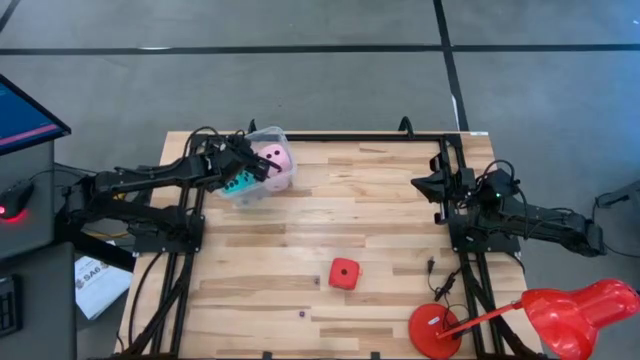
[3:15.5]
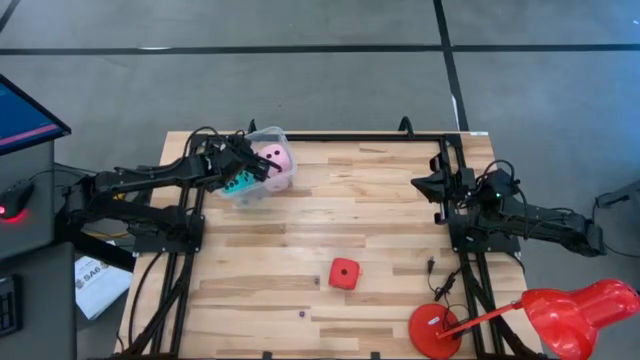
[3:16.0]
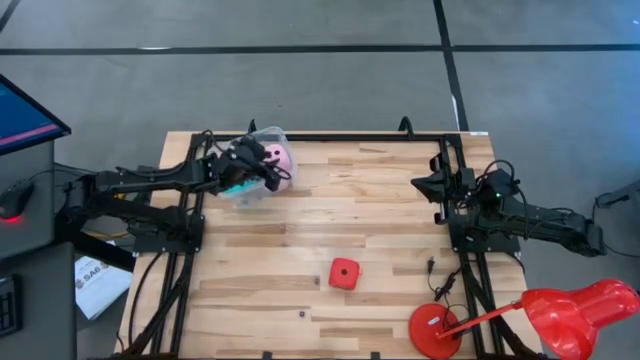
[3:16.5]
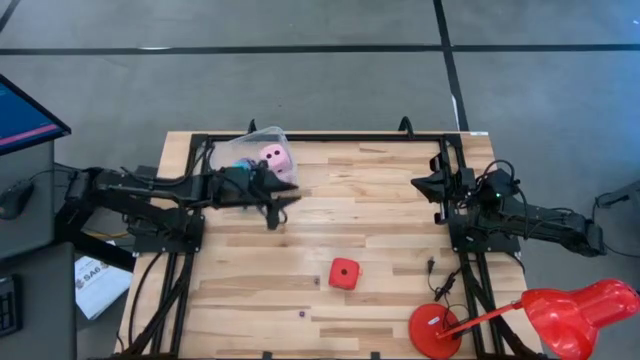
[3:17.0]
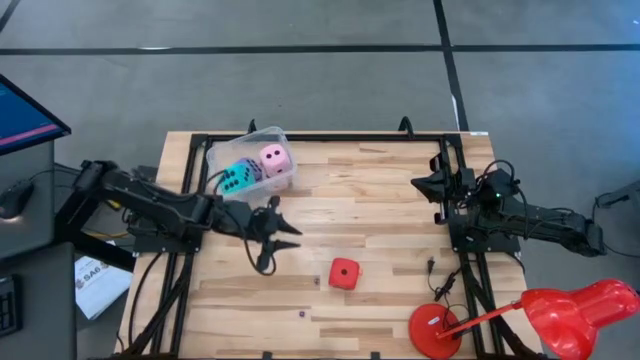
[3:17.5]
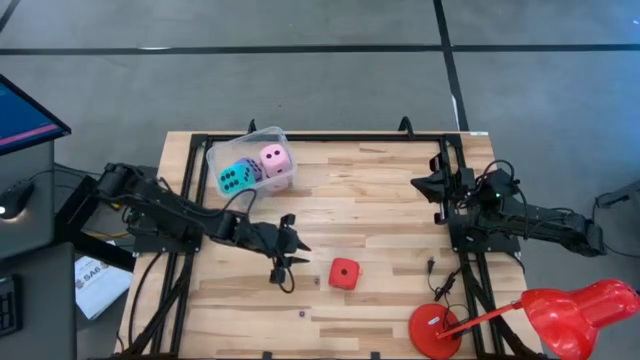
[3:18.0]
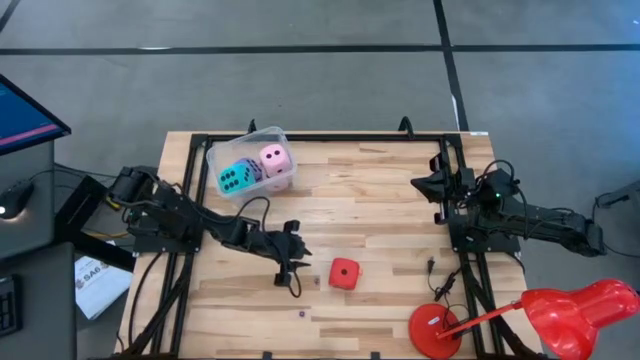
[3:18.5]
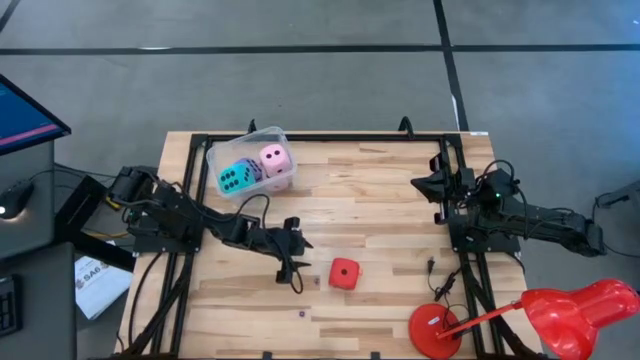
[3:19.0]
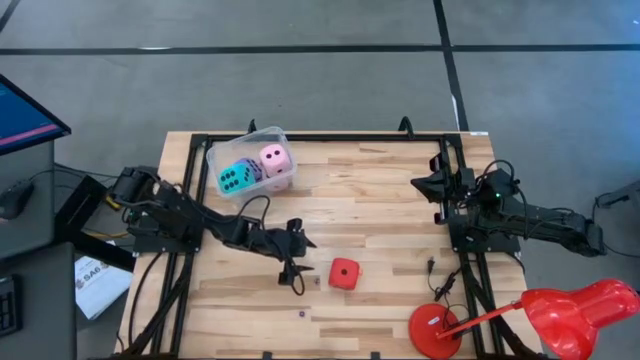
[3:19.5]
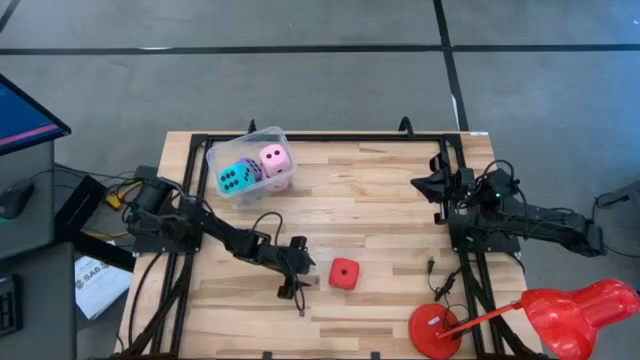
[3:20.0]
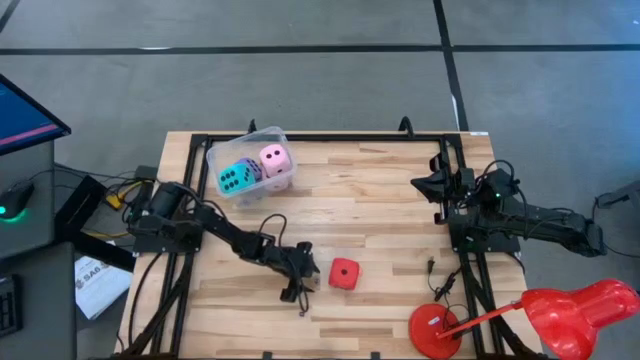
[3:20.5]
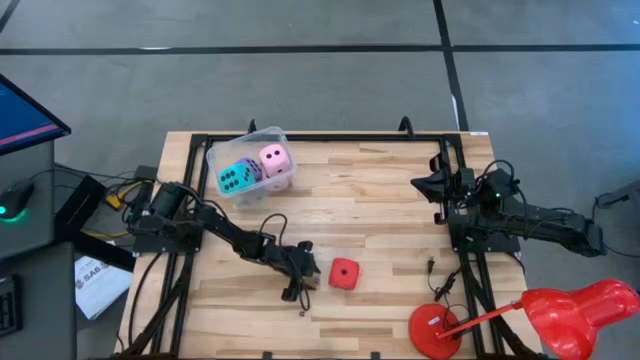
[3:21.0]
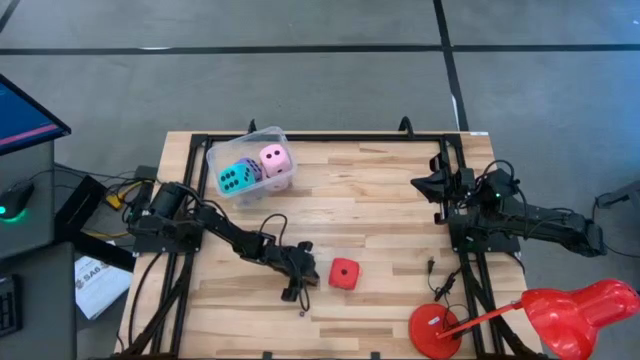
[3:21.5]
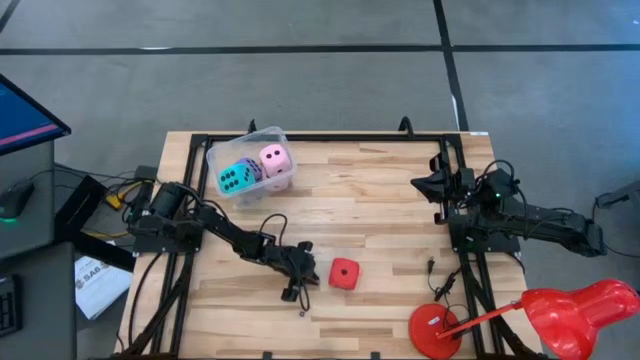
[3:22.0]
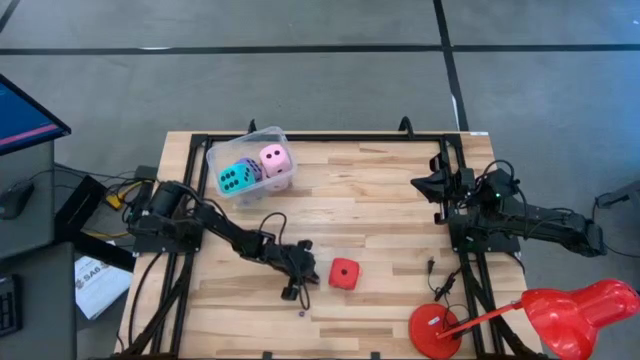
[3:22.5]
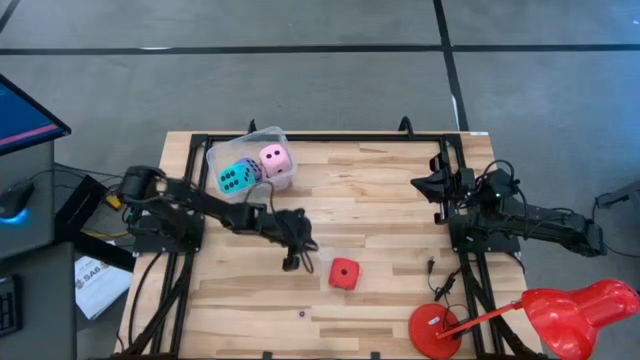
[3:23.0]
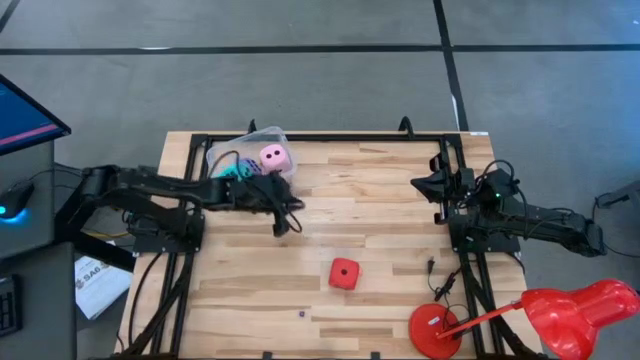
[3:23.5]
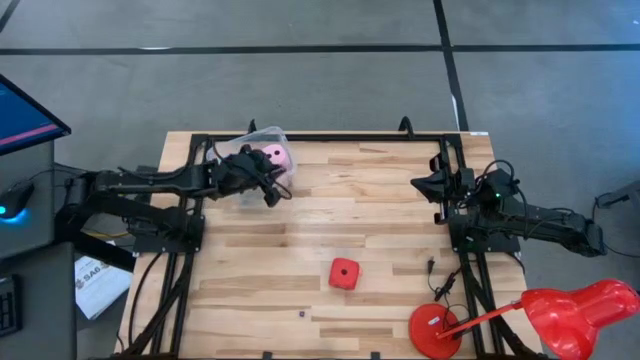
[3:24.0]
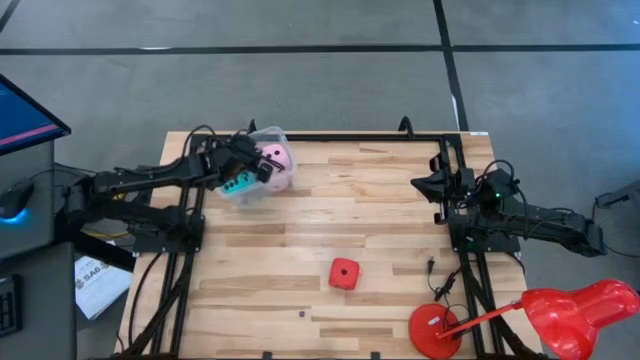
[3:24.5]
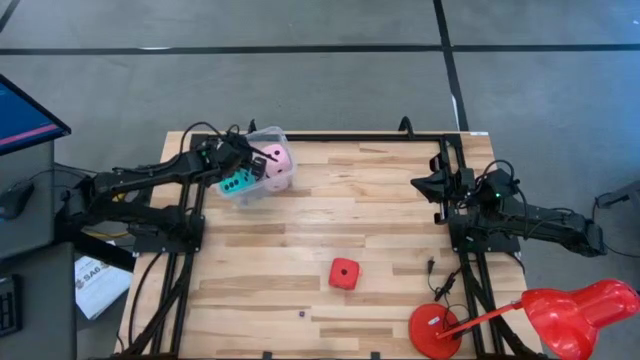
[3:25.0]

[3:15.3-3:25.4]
Task: Pick & Place Dice
Put the top small purple dice into the transparent container

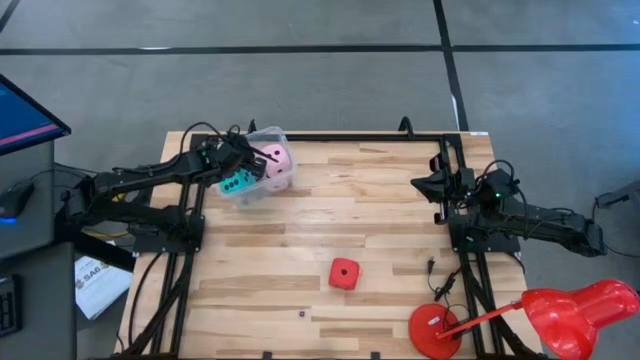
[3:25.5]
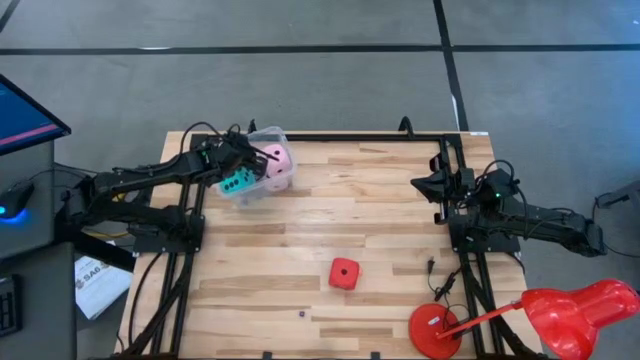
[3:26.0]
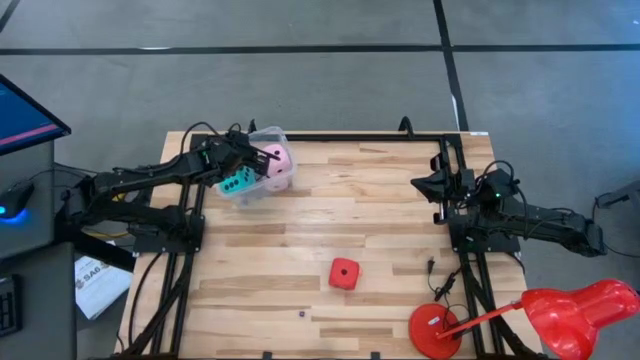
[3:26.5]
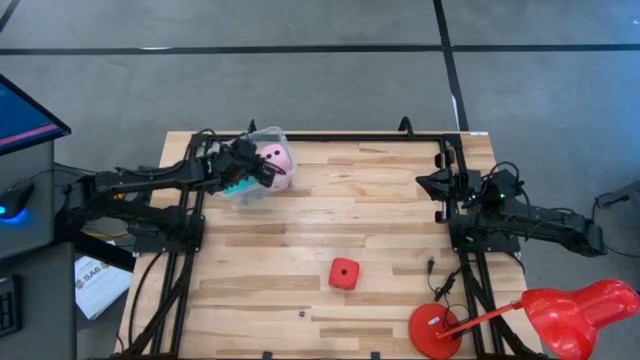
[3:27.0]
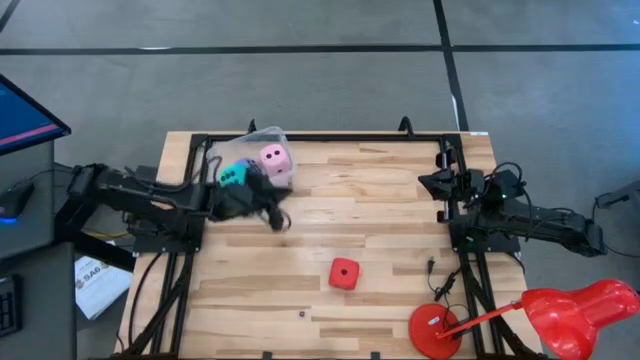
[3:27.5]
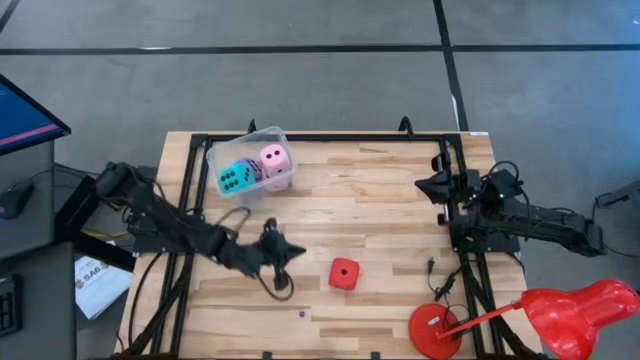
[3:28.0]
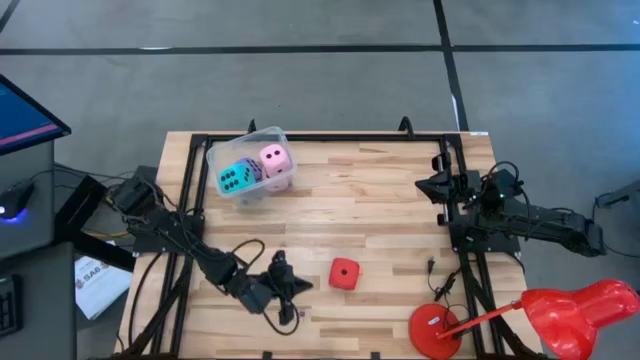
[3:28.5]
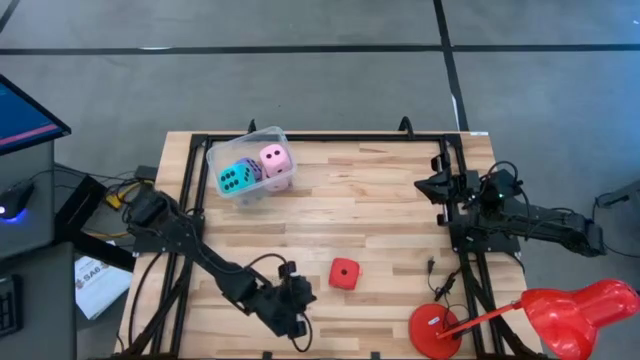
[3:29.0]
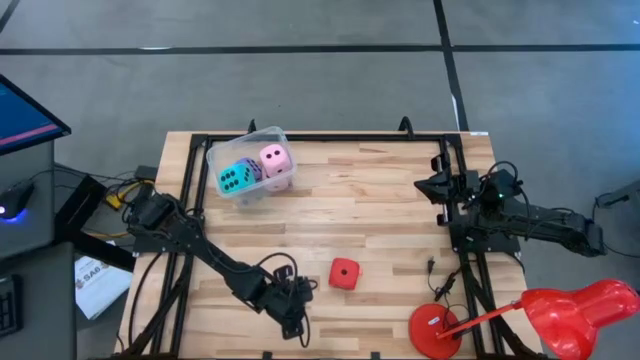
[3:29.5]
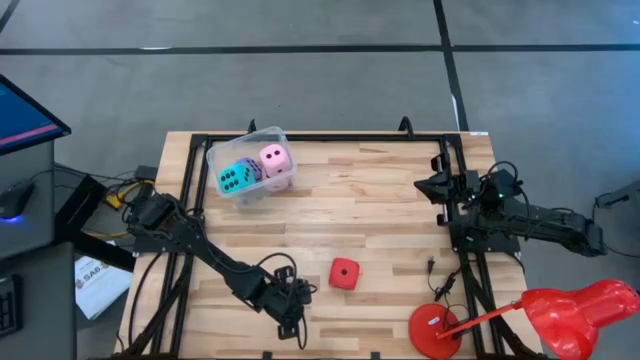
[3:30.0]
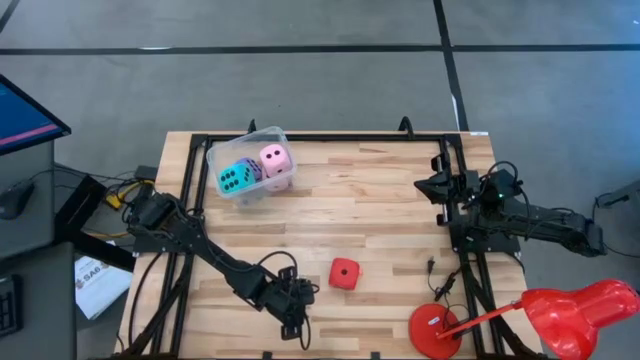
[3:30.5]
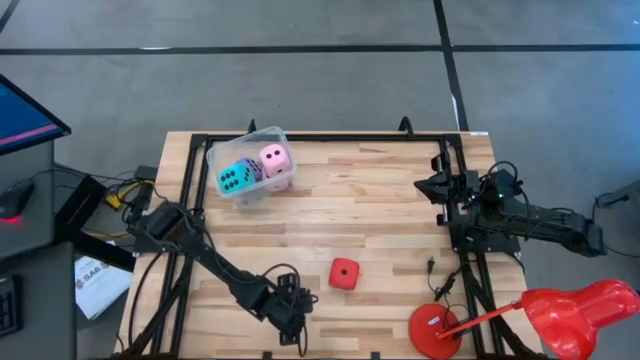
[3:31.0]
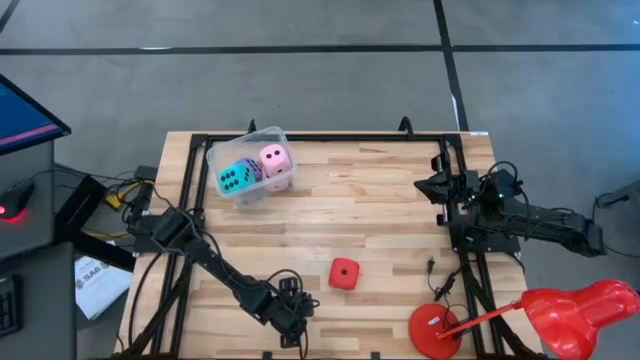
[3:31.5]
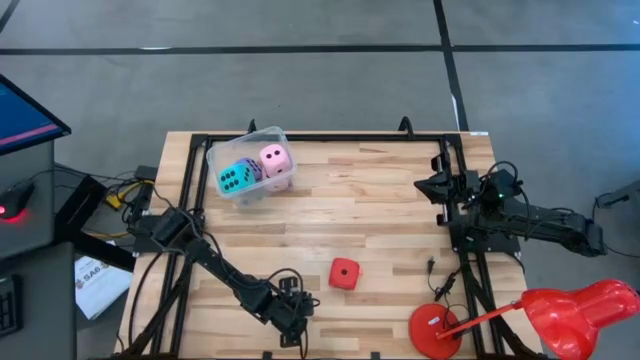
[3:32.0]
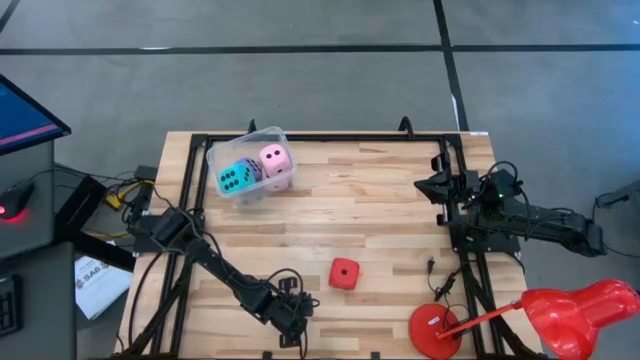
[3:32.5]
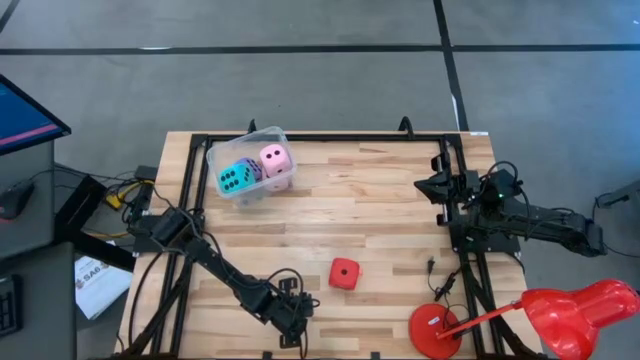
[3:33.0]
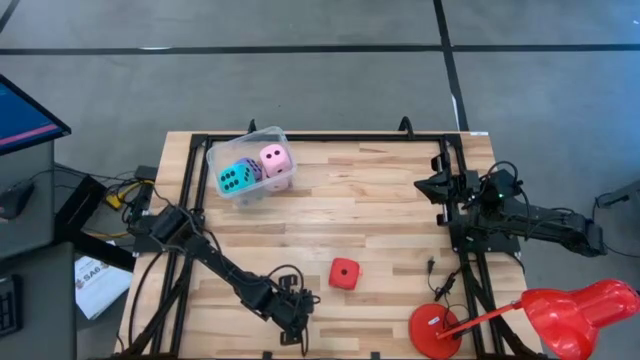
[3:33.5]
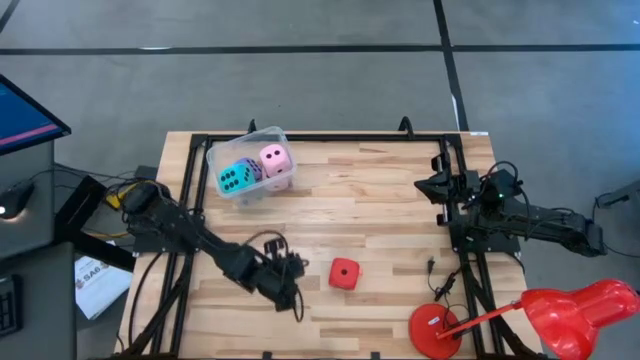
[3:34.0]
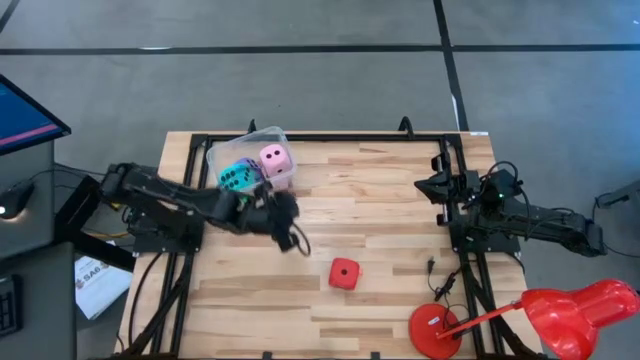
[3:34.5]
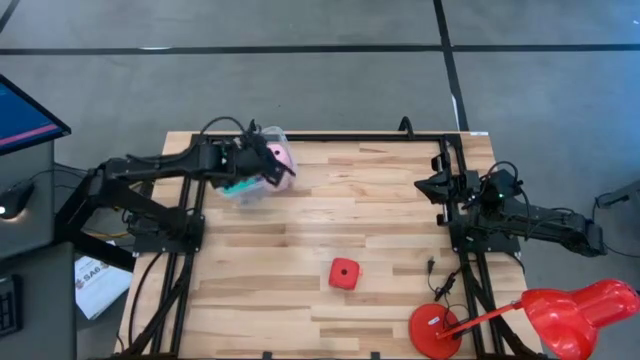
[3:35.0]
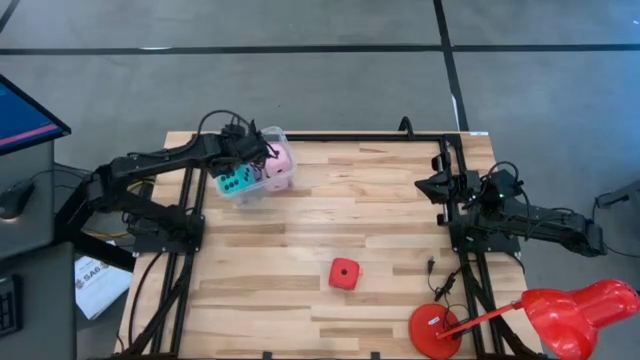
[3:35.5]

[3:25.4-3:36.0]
Put the small purple dice into the transparent container

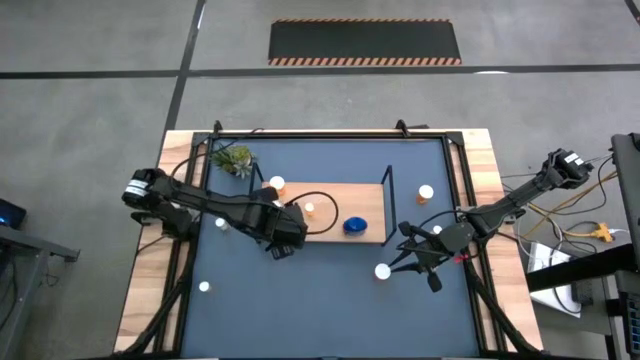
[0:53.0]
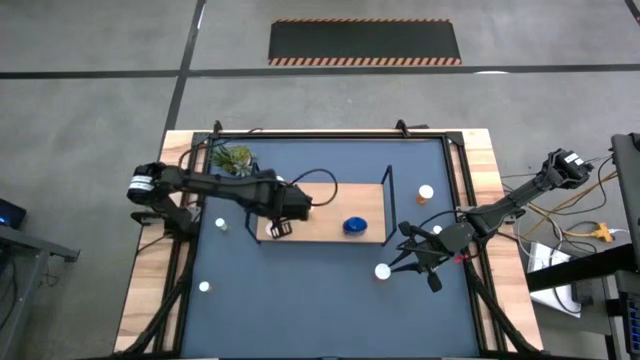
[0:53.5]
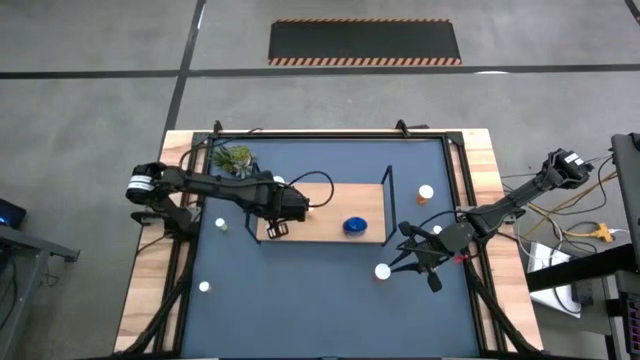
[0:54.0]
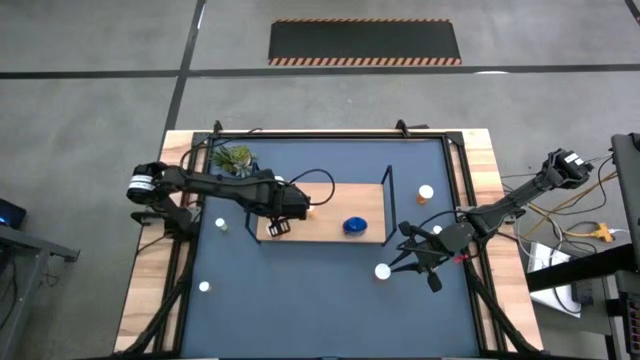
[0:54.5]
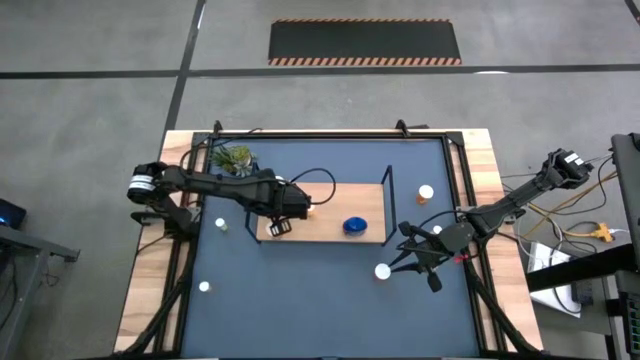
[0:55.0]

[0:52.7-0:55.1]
Task: Pick and place medicine bottles onto shelf by color
Adjust the middle big orange pill bottle on the shelf
